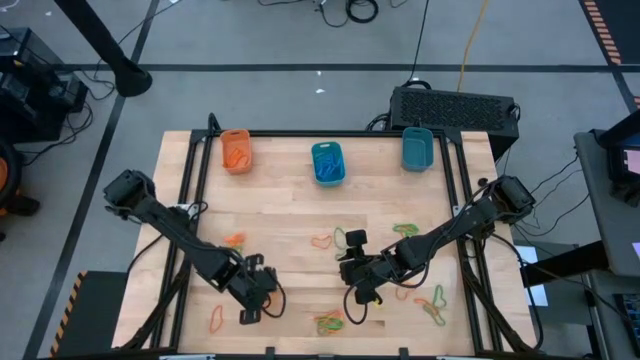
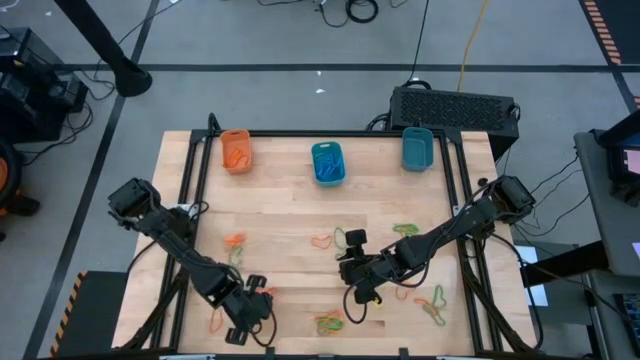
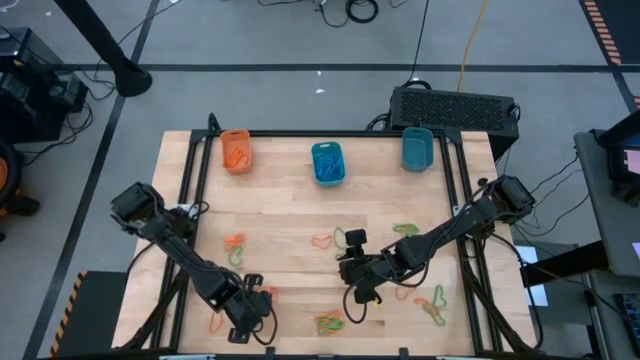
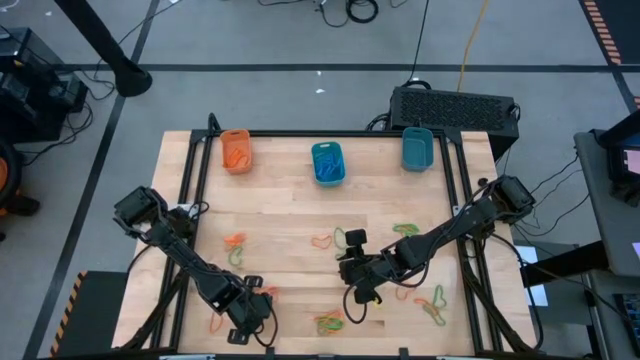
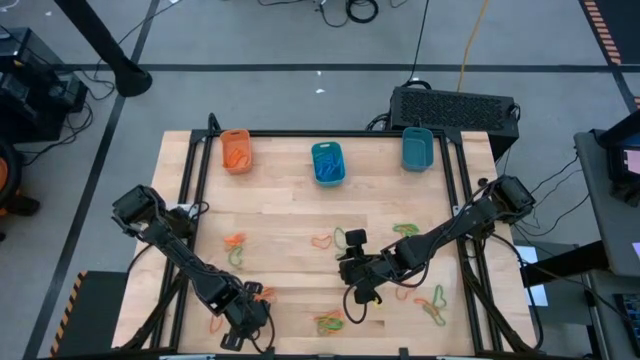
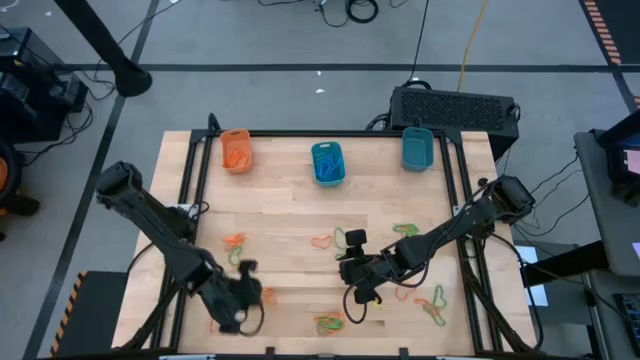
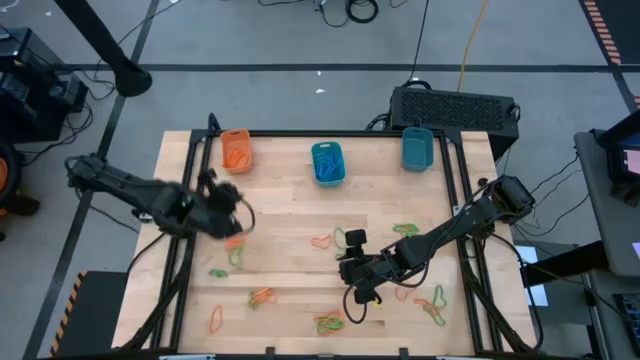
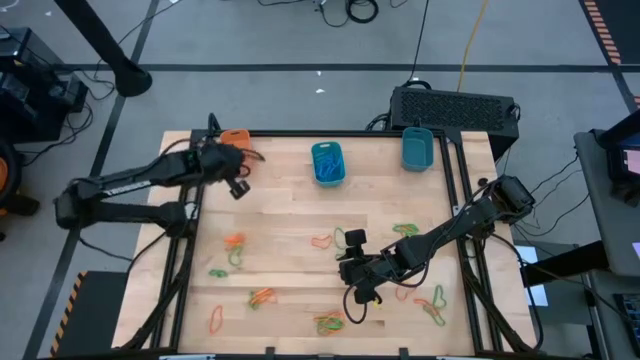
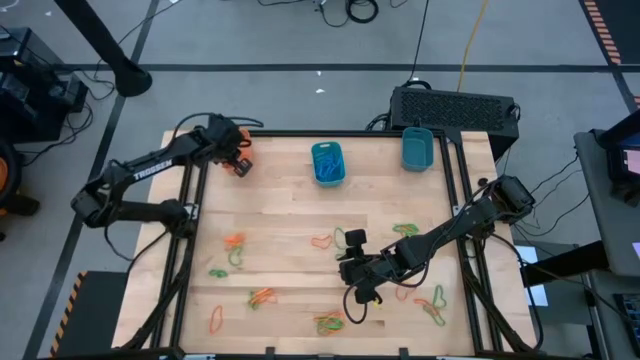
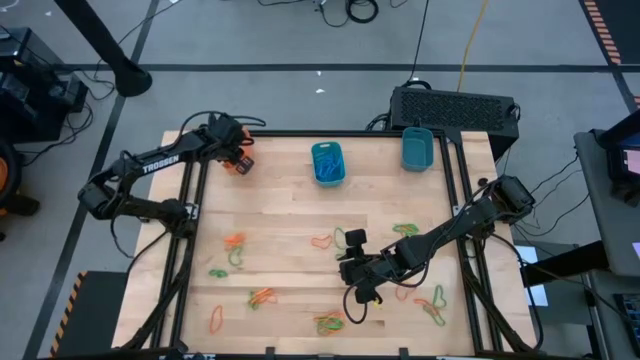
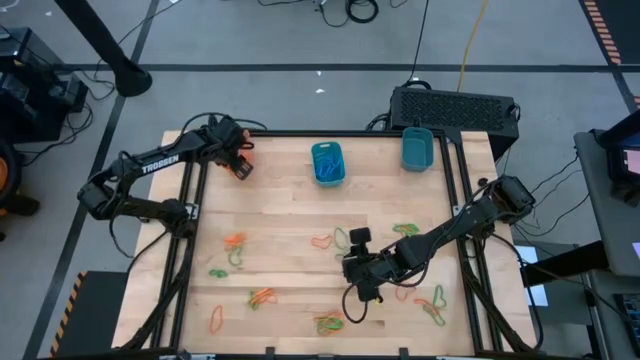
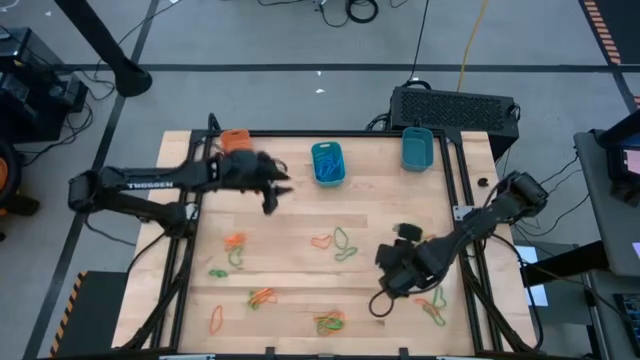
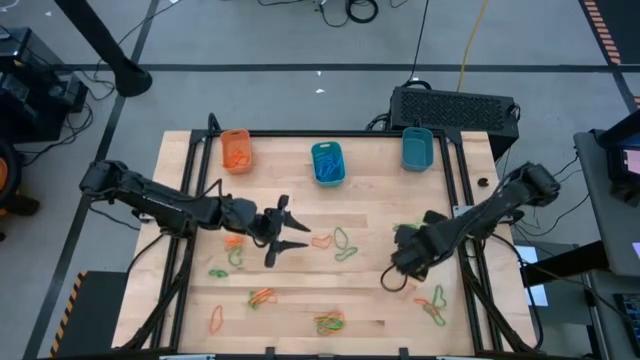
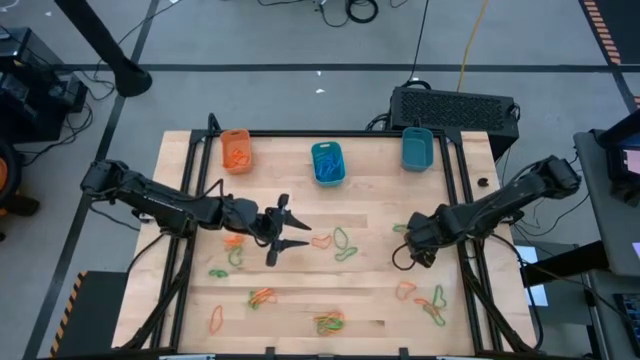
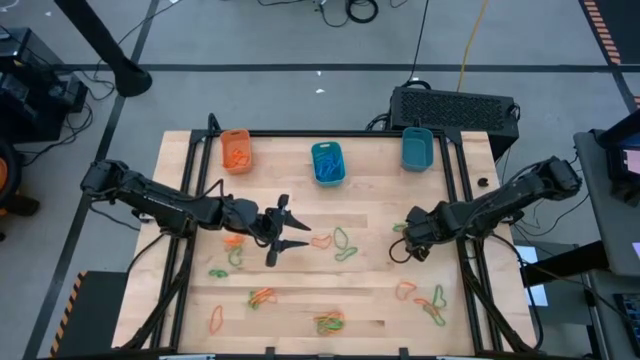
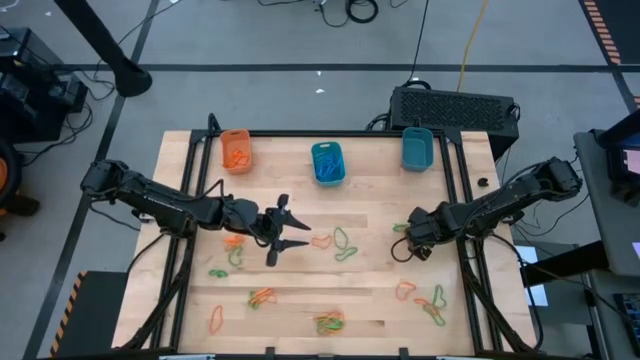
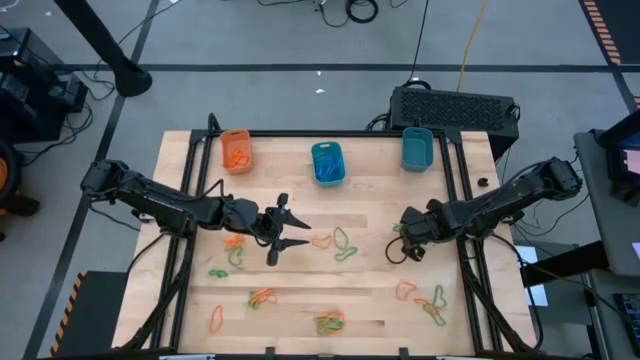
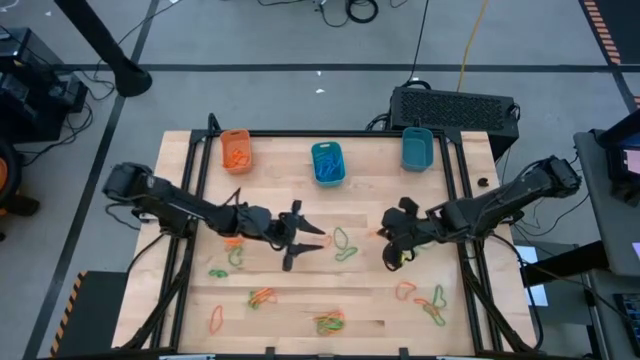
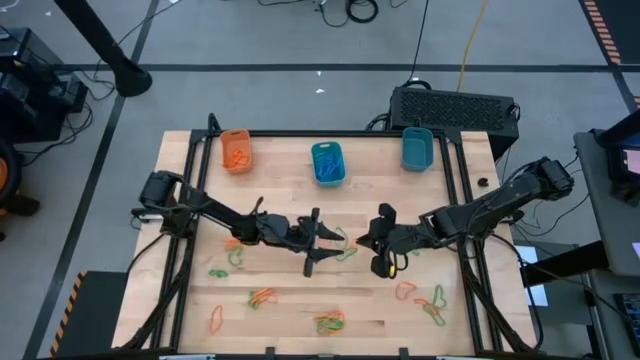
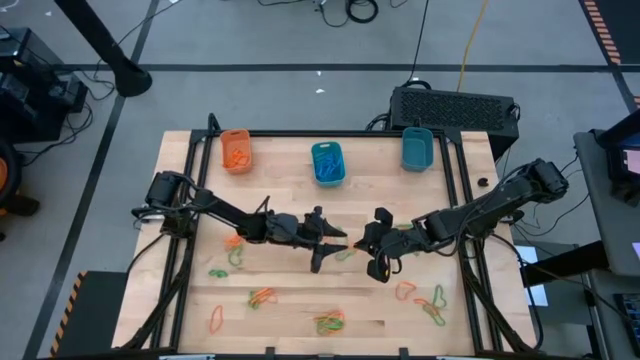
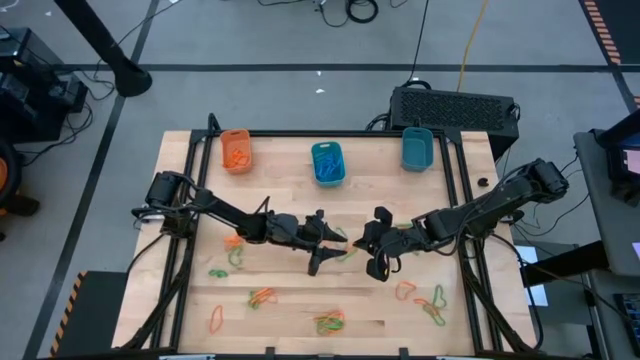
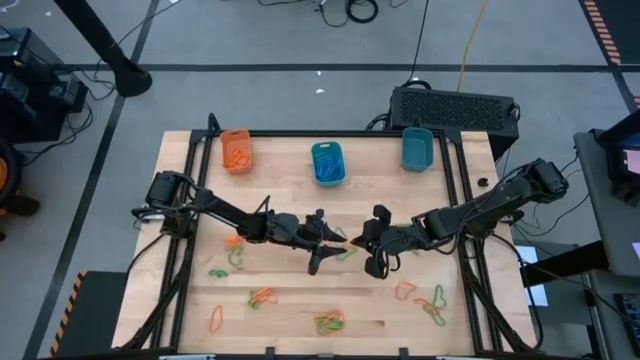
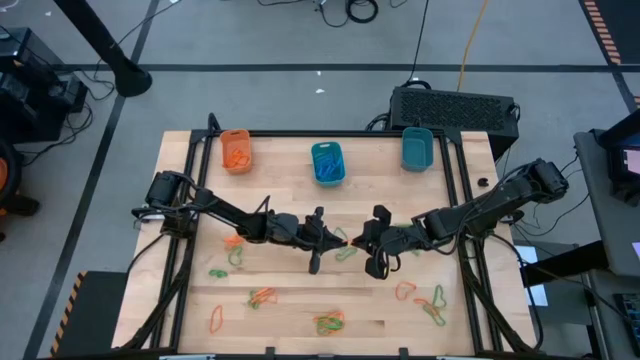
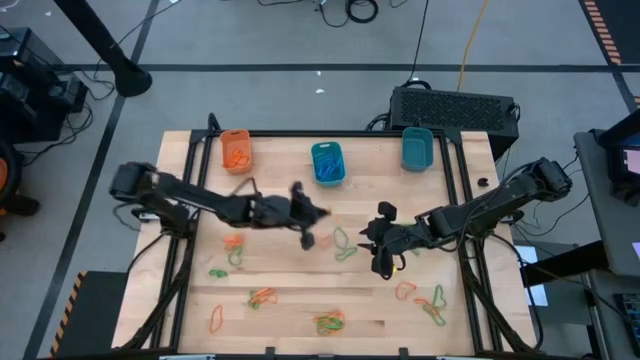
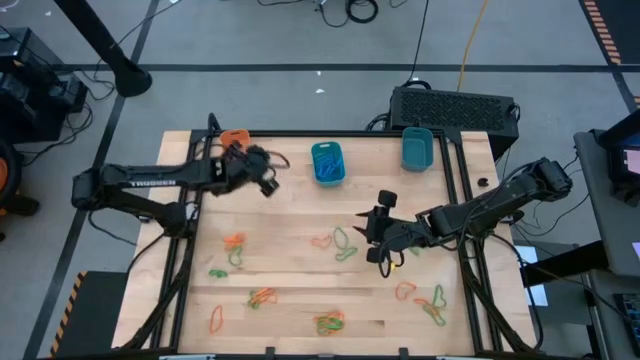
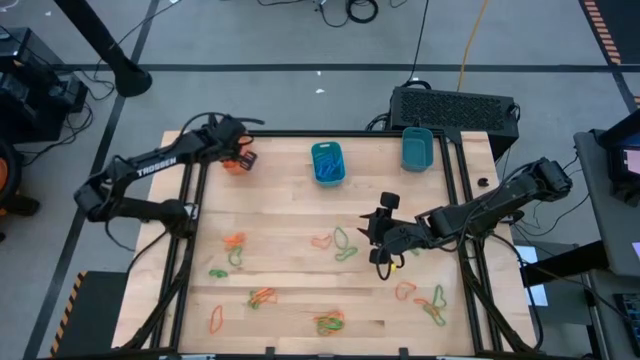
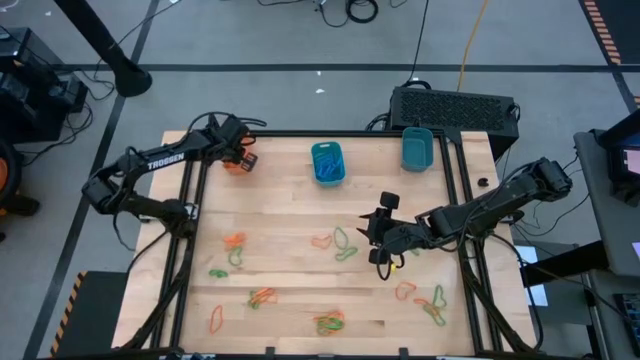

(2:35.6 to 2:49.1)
Task: Sort rubber bands into baskets
Put the orange rubber band into the orange bin

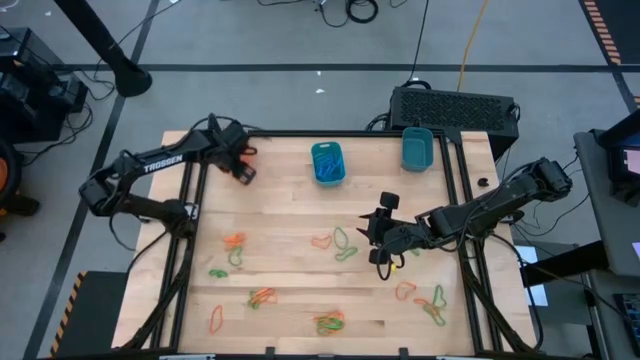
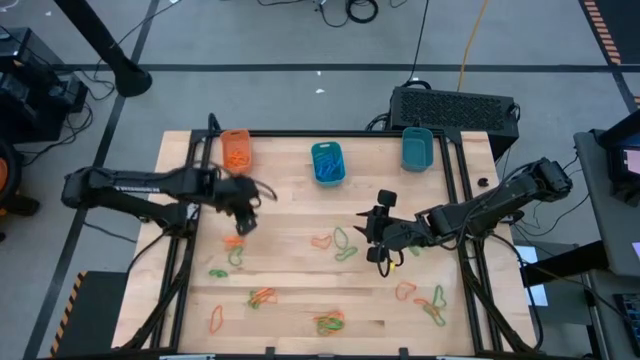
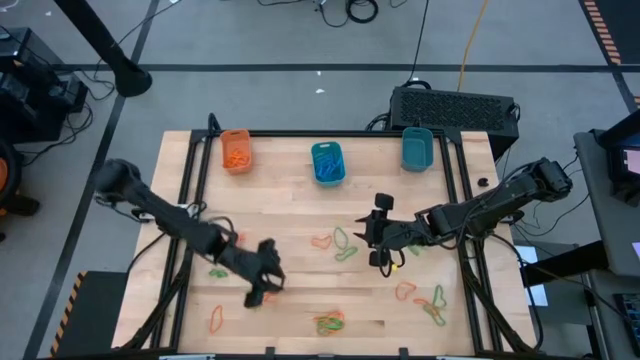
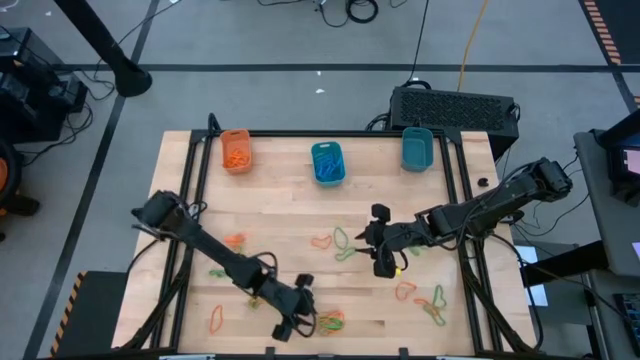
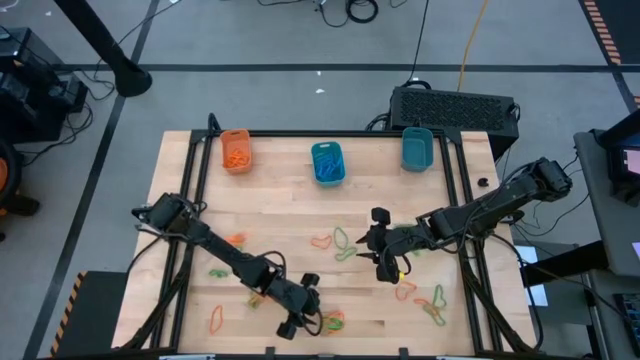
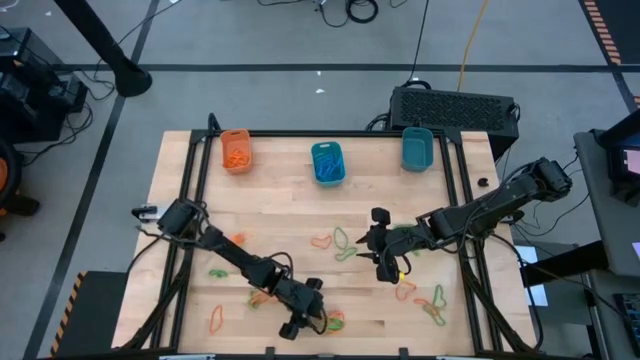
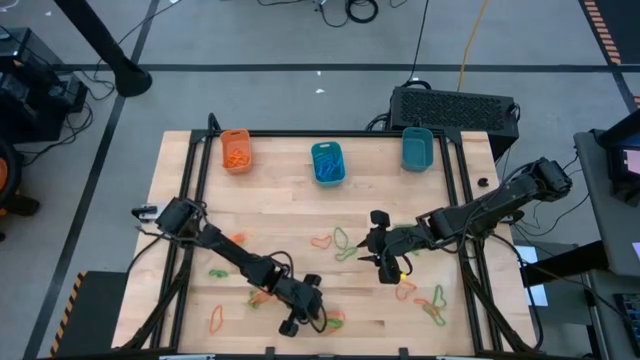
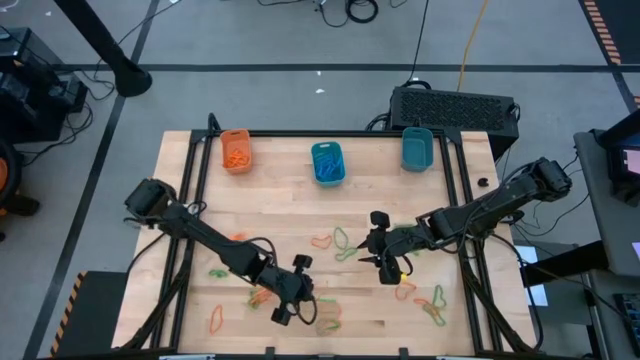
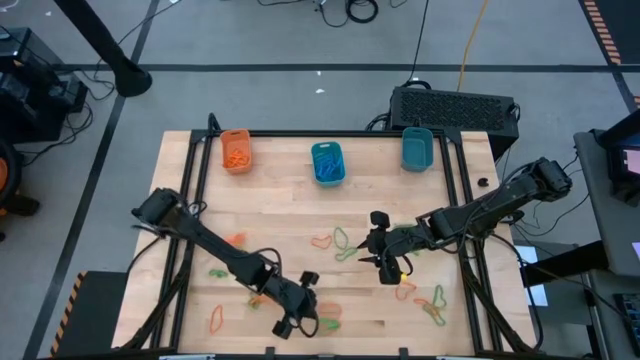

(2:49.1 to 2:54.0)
Put the orange rubber band into the orange bin
